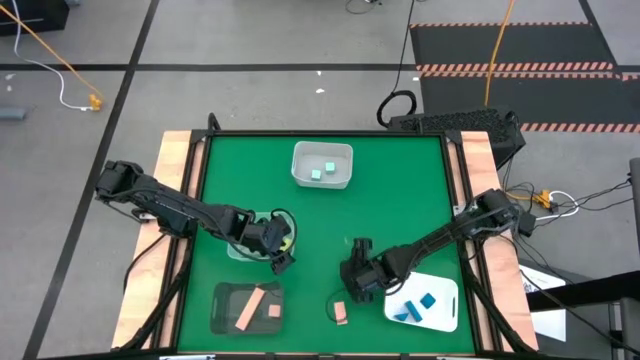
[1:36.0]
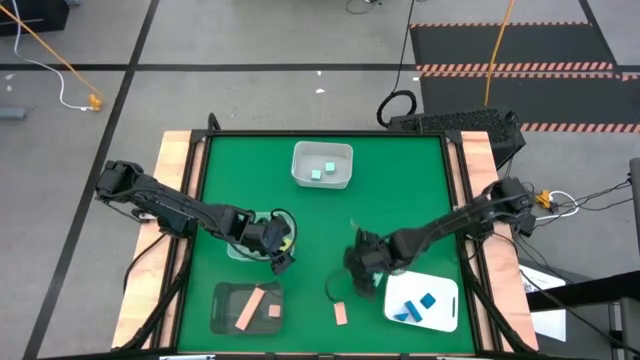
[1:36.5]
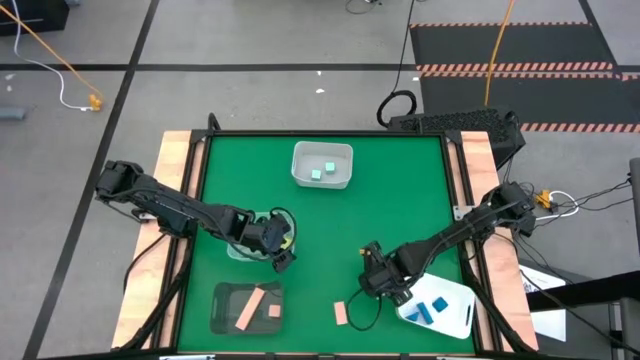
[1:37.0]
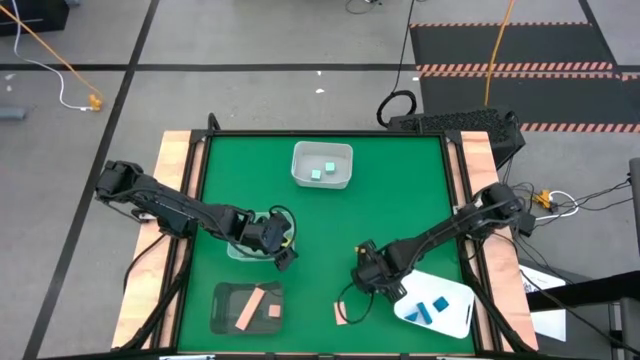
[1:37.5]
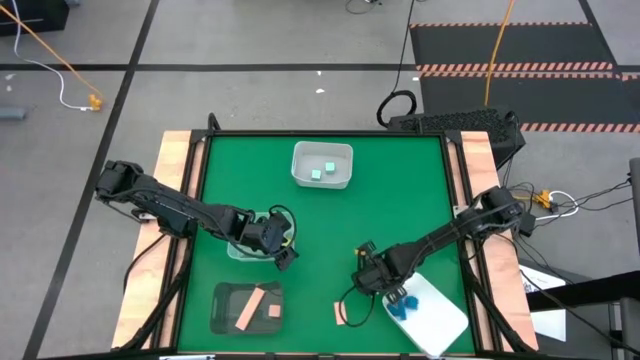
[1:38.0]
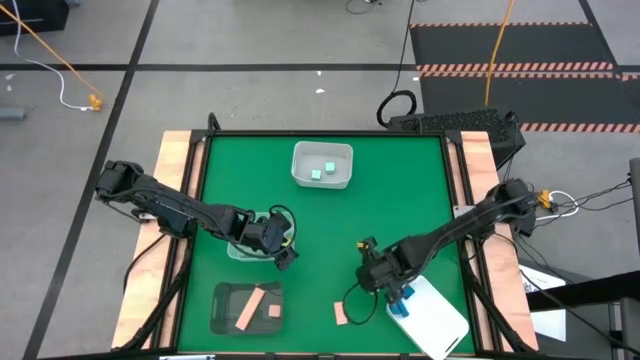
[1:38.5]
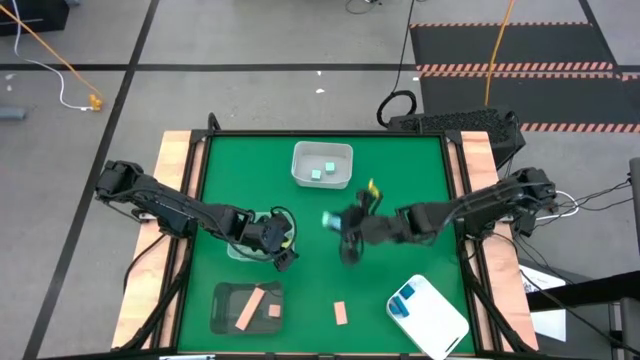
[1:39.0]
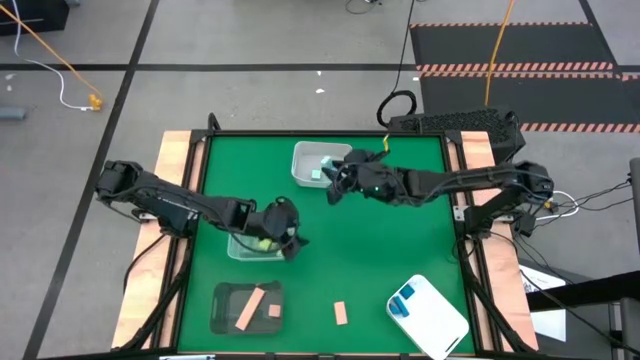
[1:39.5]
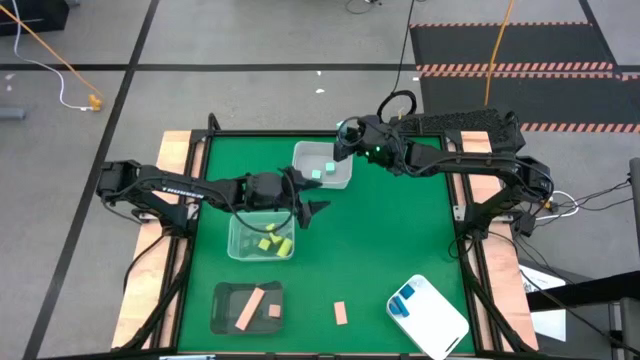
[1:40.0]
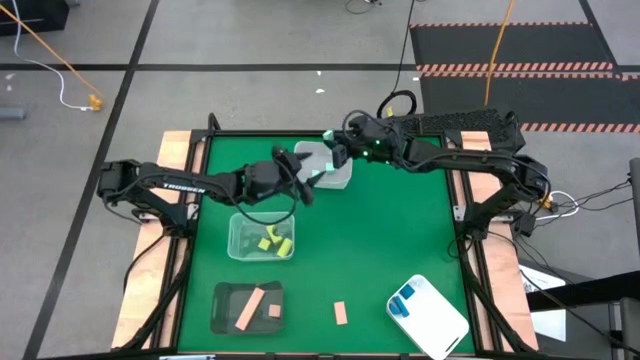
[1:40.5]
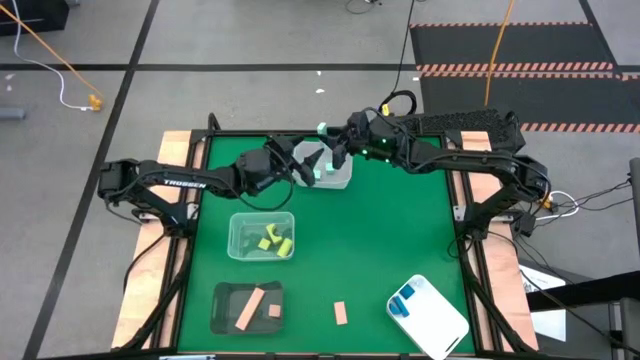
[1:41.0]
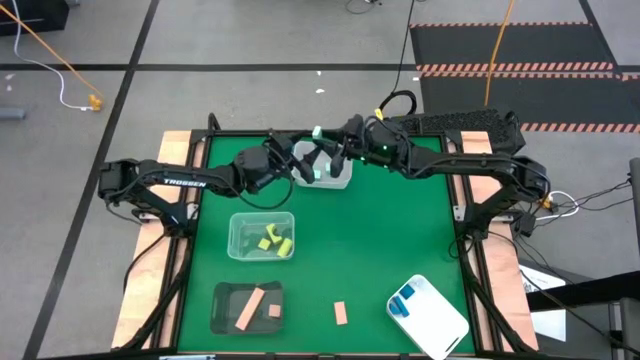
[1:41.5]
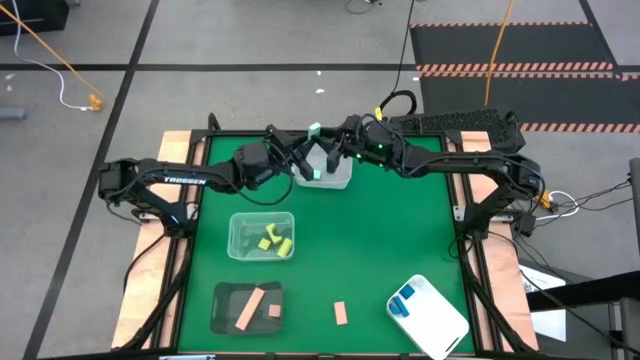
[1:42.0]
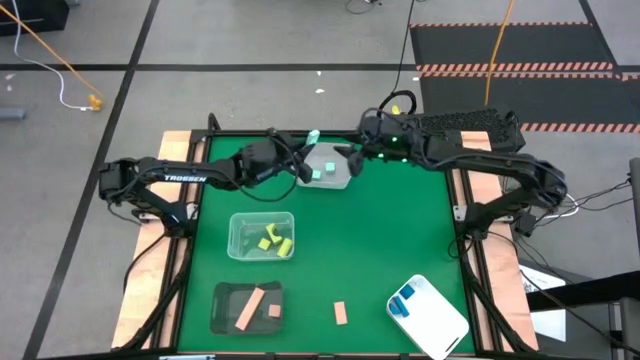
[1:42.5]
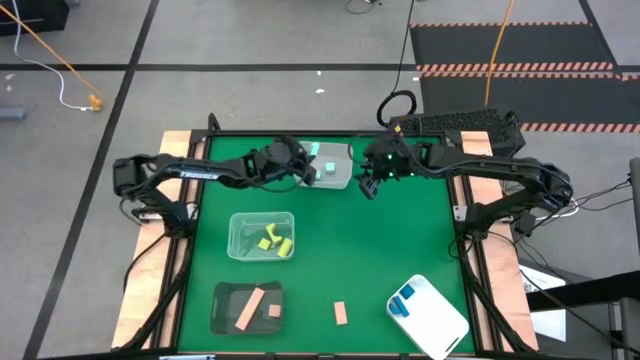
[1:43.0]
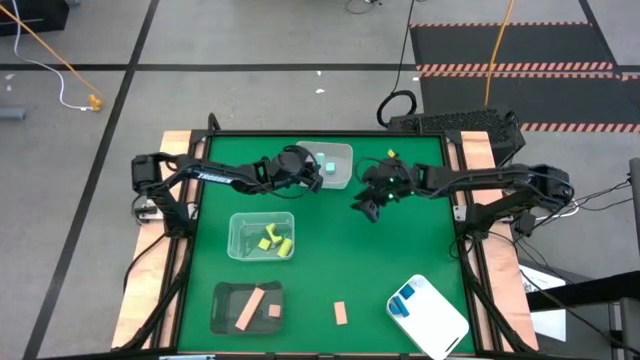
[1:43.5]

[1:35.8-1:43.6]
Task: Sort & place blocks by color
Put the light blue rectangular block into the top white bin

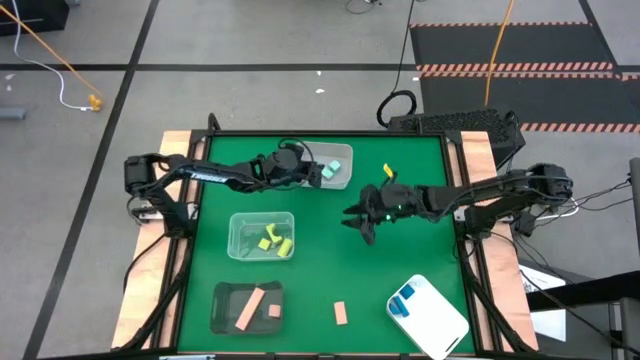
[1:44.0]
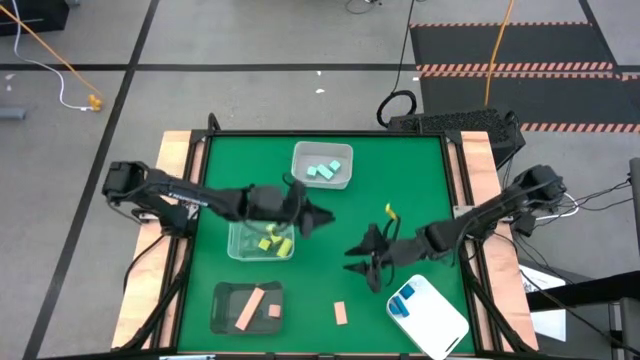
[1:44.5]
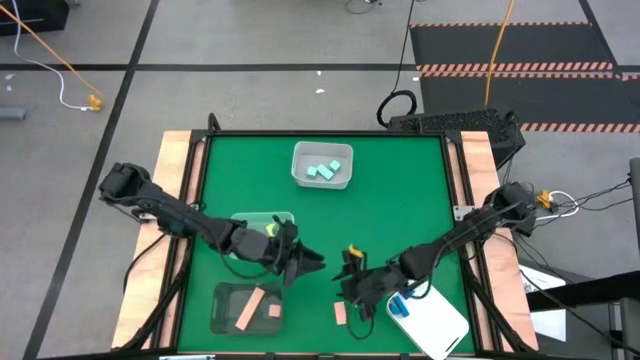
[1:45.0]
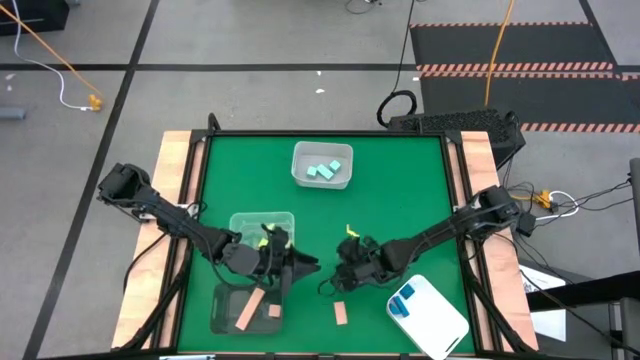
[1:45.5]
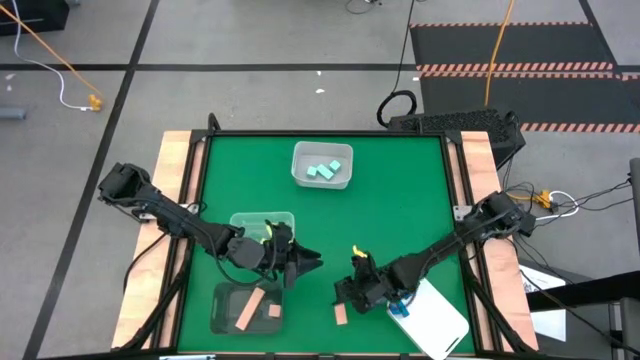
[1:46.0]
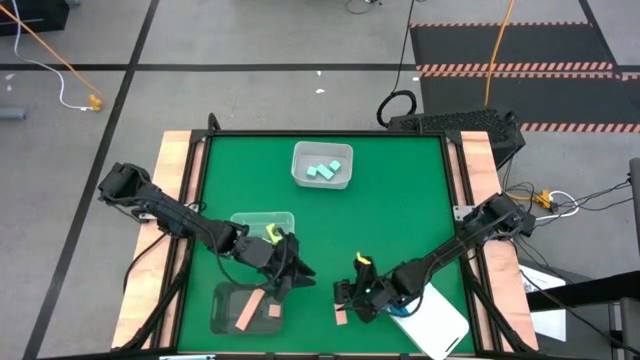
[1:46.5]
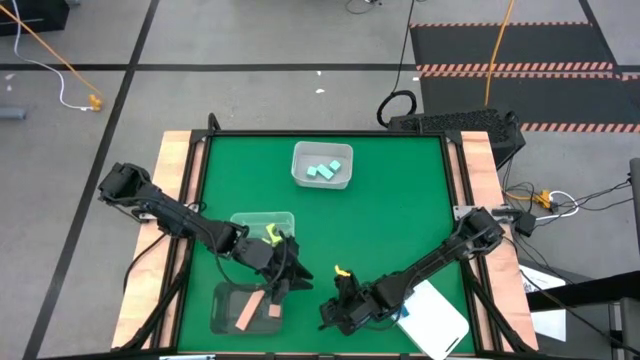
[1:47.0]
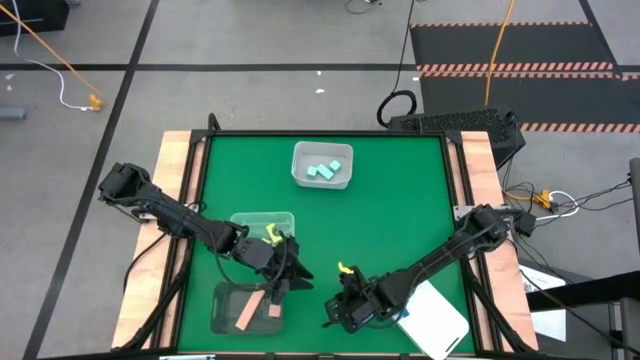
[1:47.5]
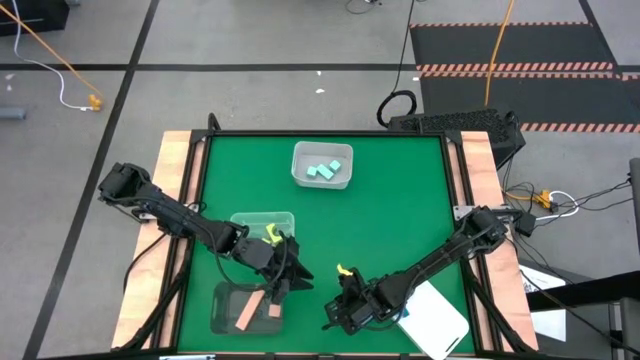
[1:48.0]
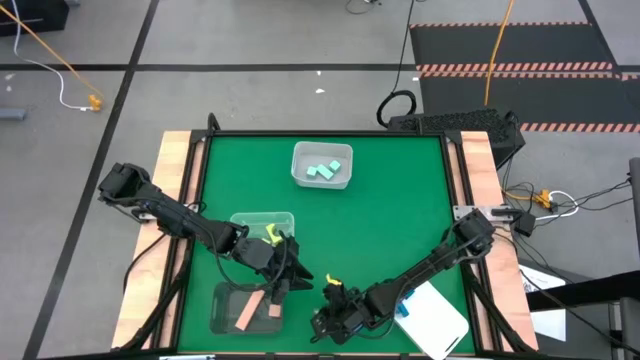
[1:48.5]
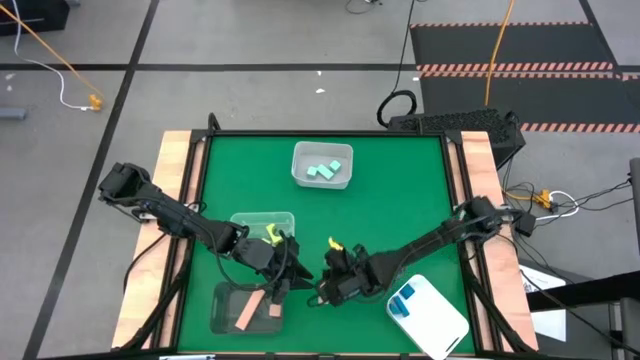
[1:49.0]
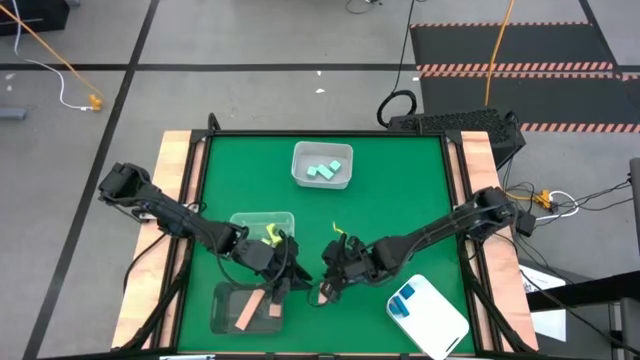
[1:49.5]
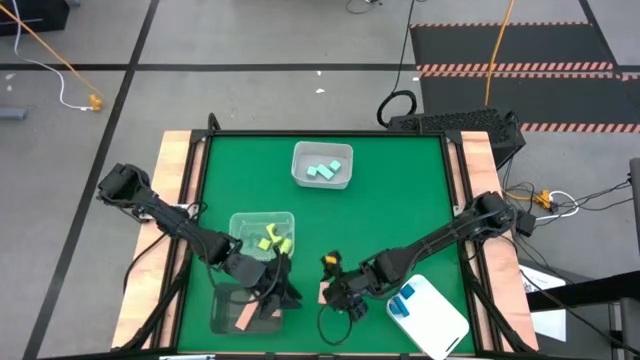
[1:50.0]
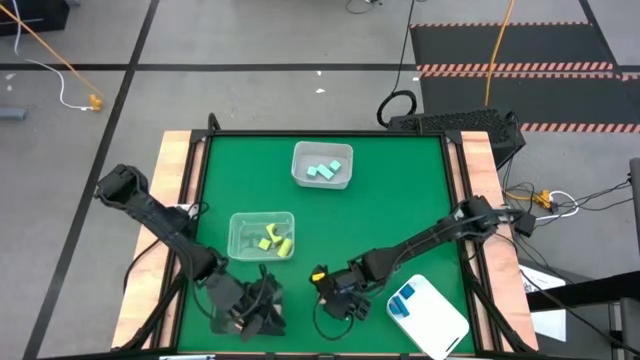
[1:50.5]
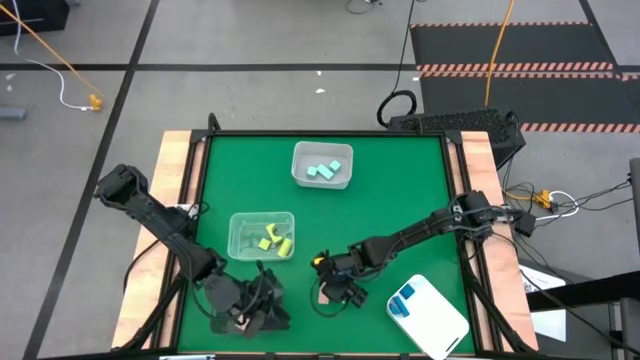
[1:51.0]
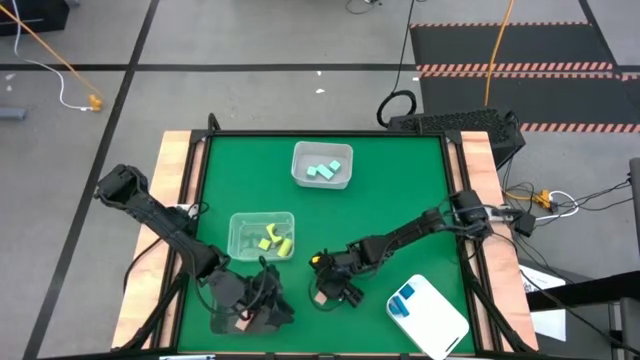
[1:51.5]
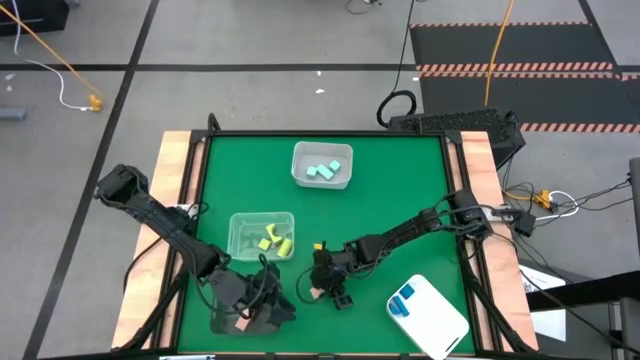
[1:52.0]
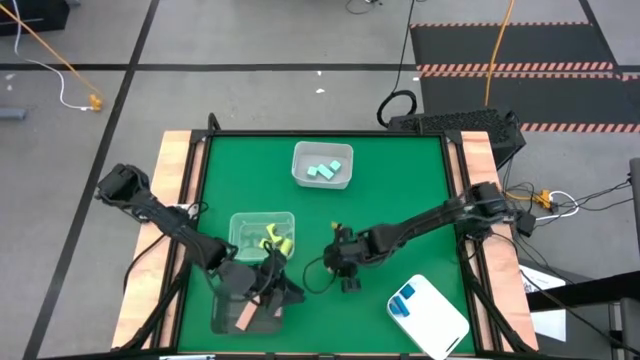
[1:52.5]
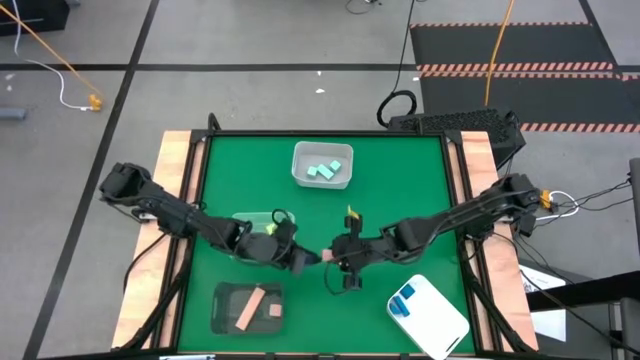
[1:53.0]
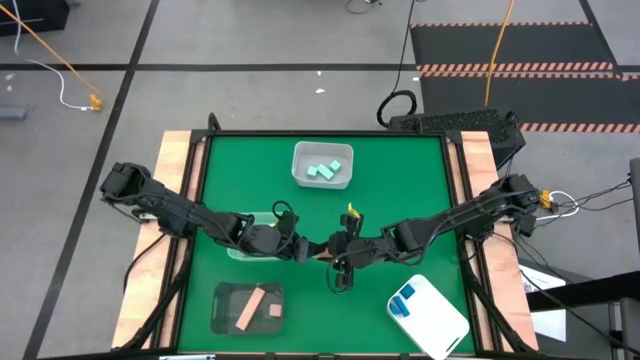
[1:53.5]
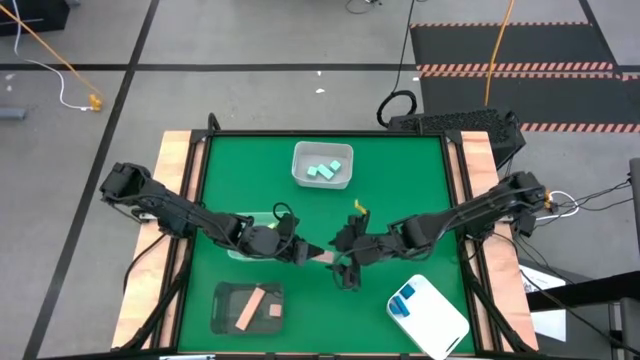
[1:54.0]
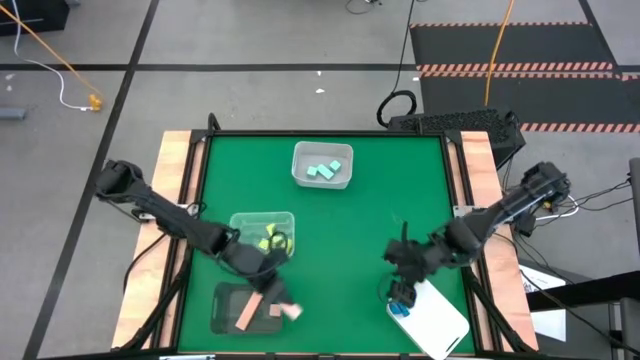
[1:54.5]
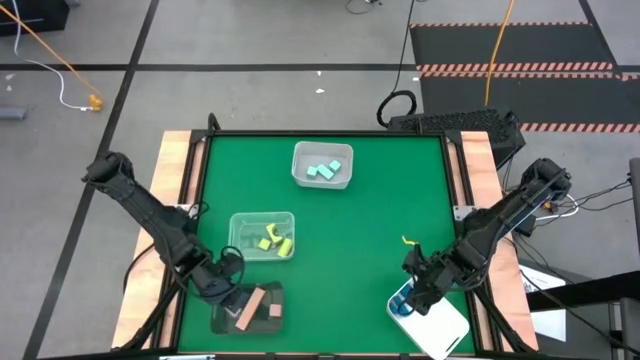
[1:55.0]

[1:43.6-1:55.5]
Put the light brown block into the top black bin

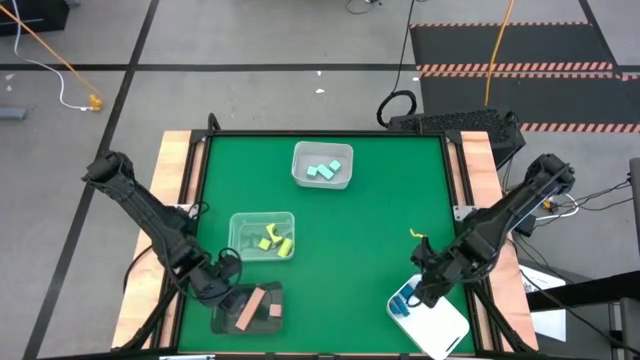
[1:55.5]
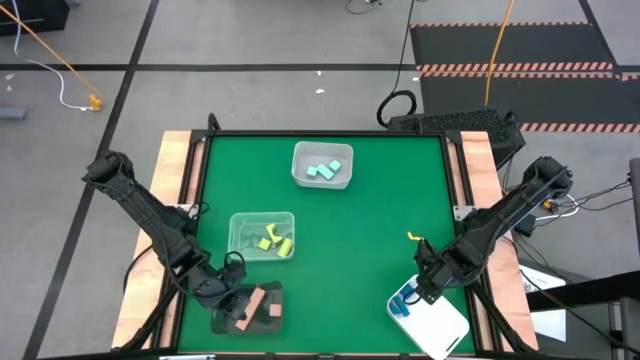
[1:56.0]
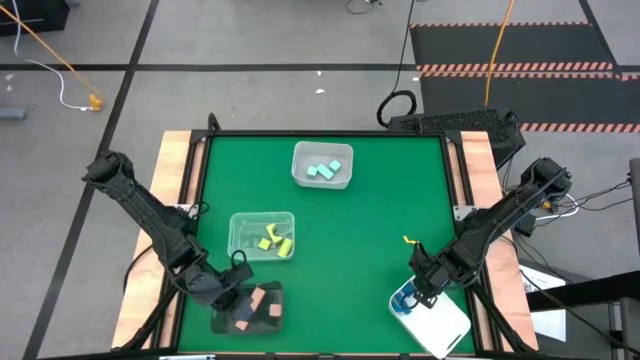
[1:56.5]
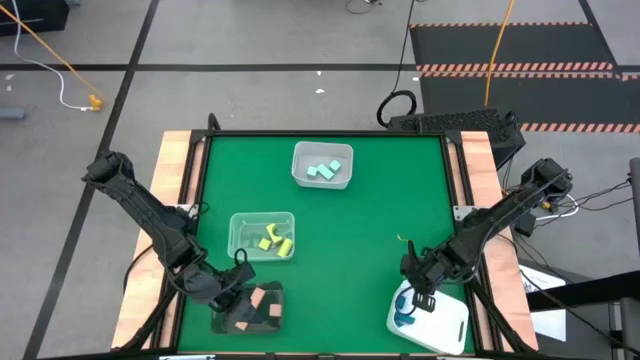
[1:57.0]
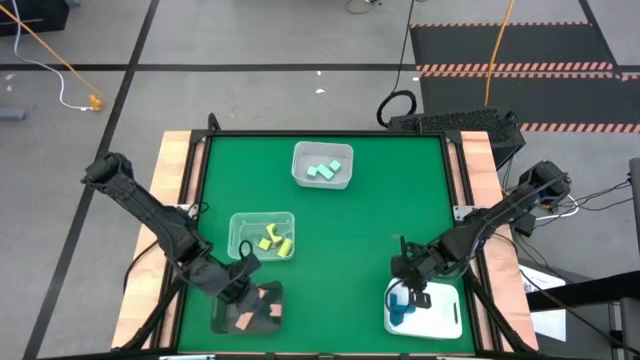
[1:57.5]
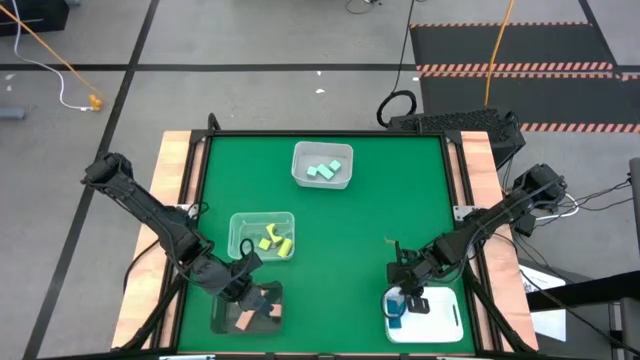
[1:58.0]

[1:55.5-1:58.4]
Adjust the white bin
